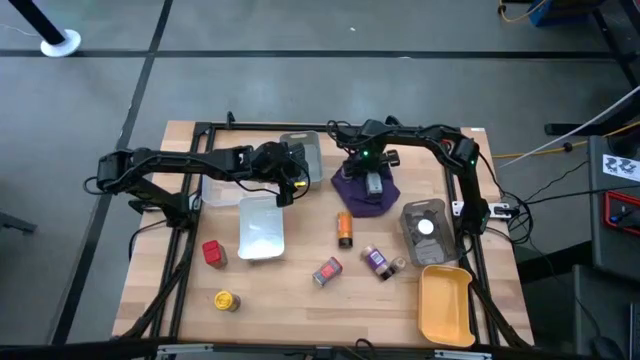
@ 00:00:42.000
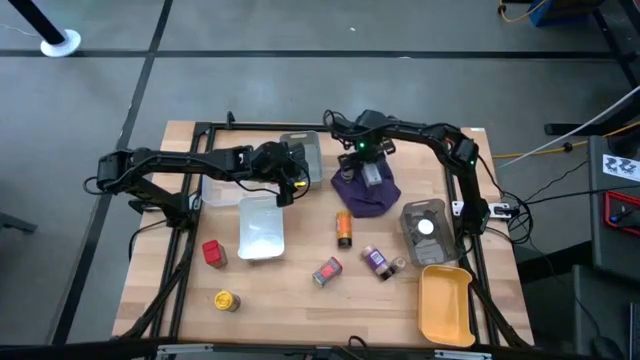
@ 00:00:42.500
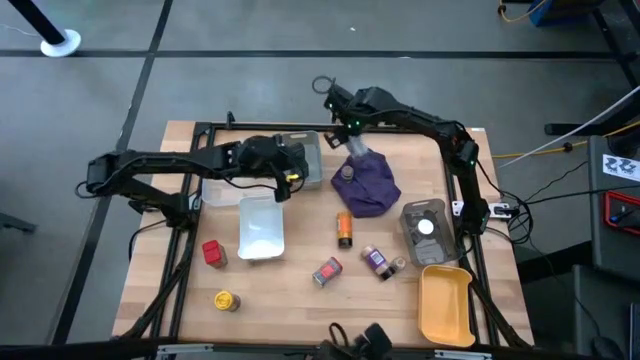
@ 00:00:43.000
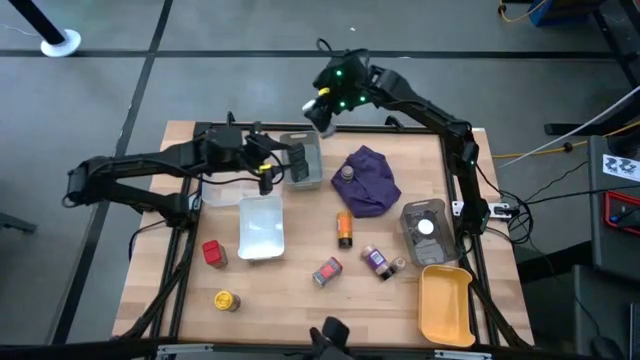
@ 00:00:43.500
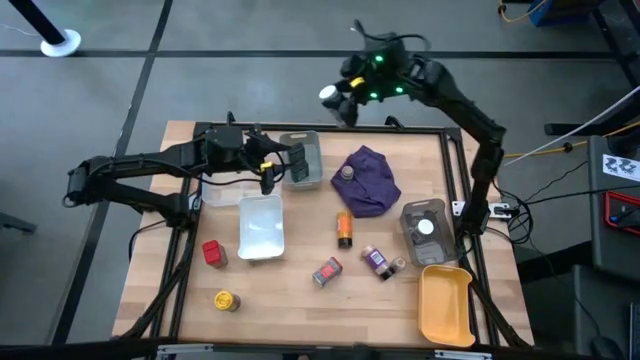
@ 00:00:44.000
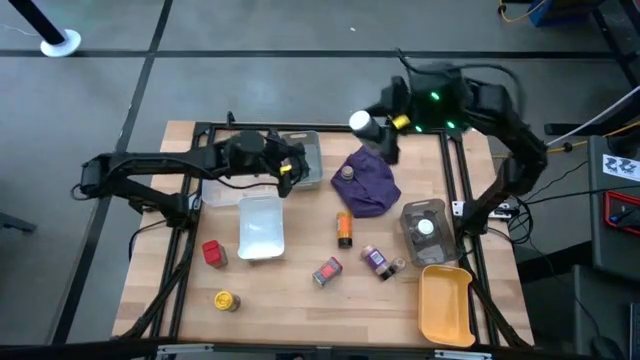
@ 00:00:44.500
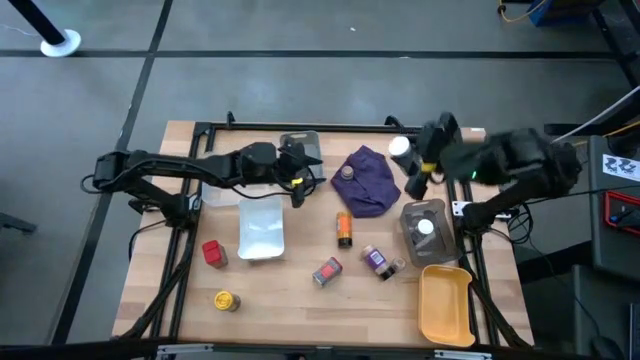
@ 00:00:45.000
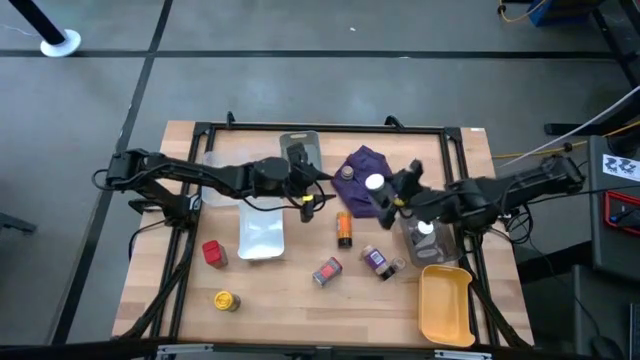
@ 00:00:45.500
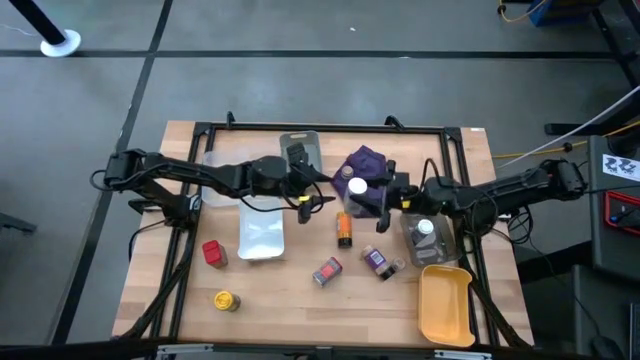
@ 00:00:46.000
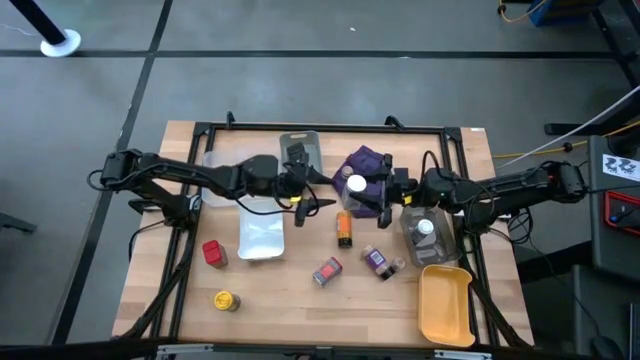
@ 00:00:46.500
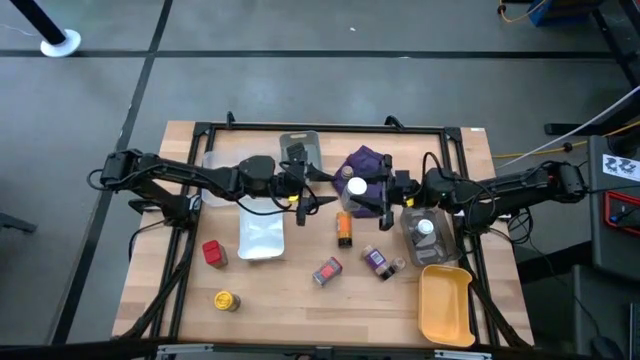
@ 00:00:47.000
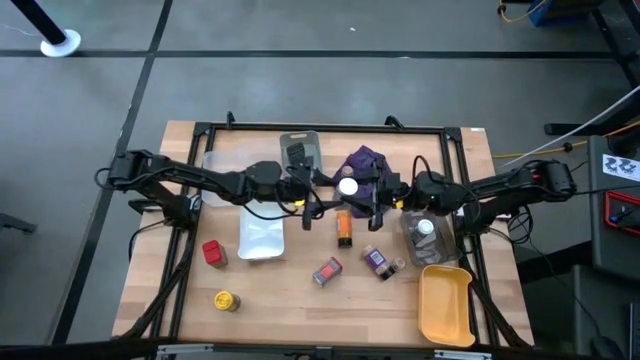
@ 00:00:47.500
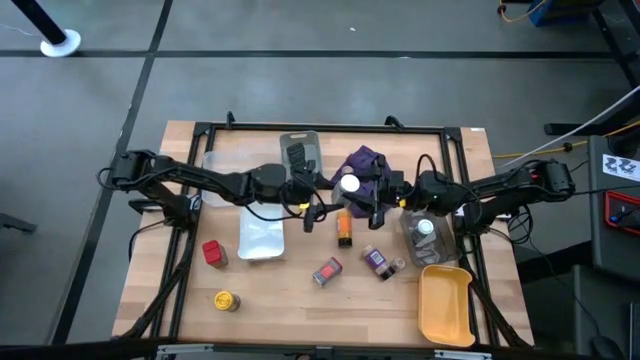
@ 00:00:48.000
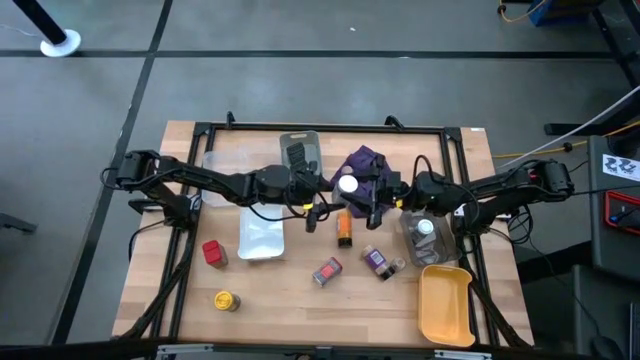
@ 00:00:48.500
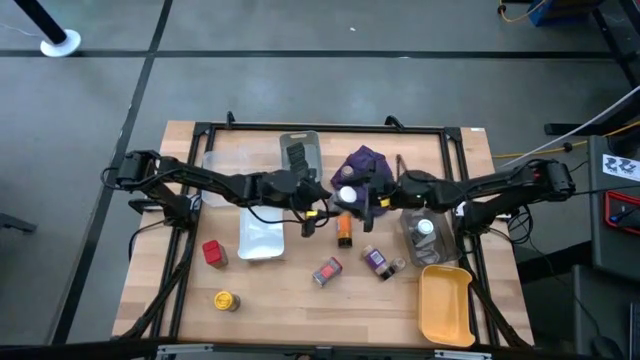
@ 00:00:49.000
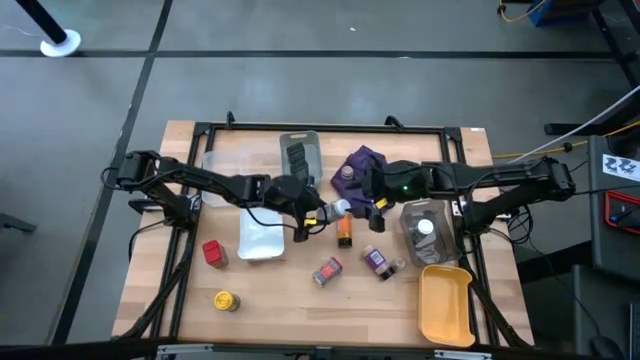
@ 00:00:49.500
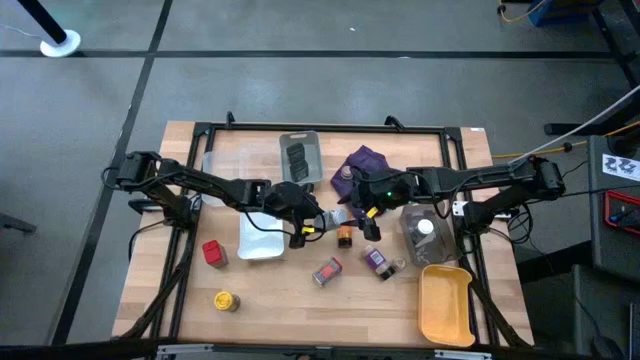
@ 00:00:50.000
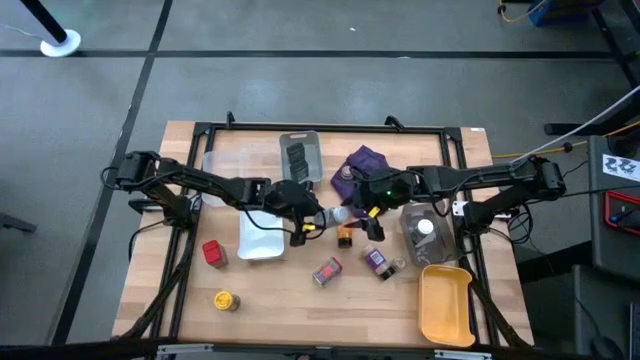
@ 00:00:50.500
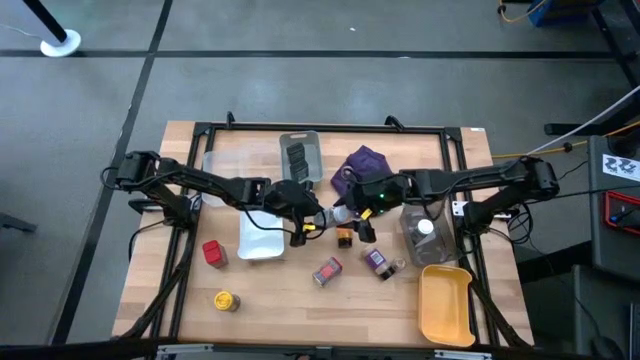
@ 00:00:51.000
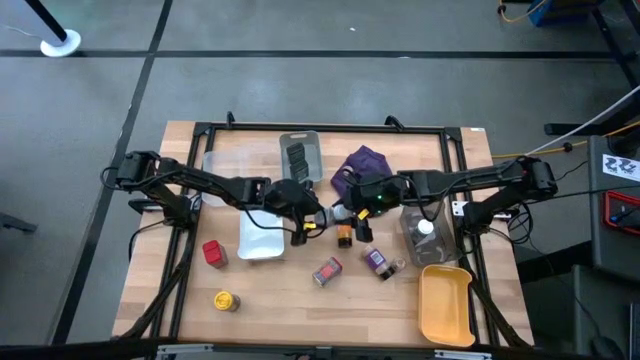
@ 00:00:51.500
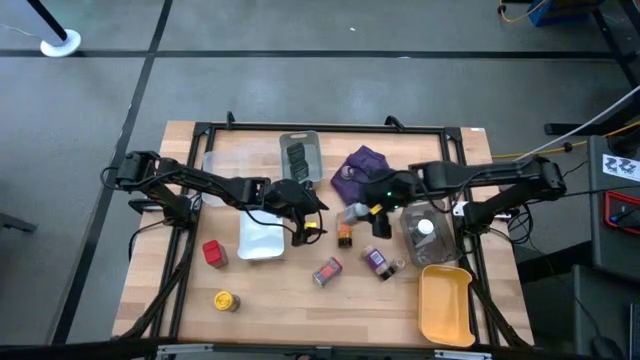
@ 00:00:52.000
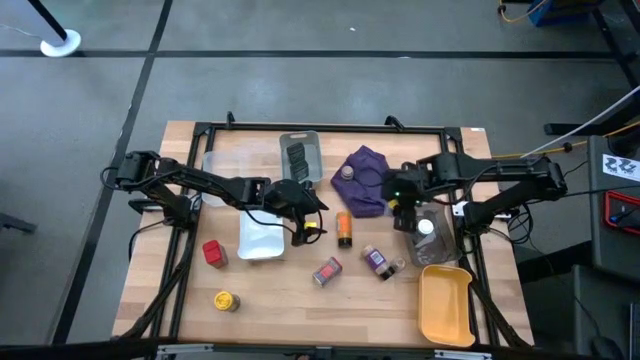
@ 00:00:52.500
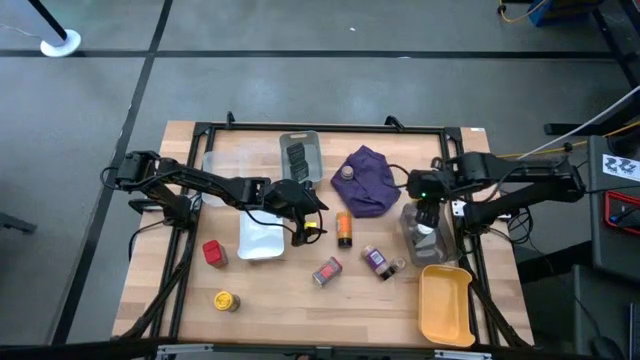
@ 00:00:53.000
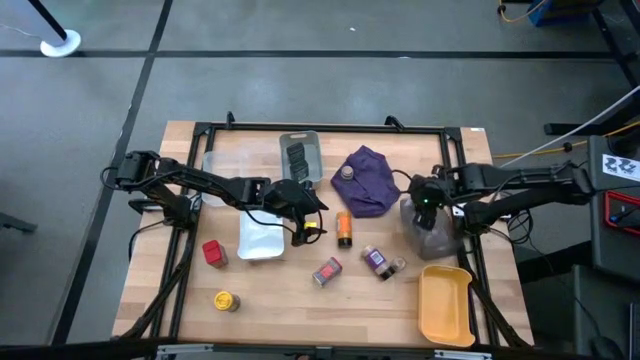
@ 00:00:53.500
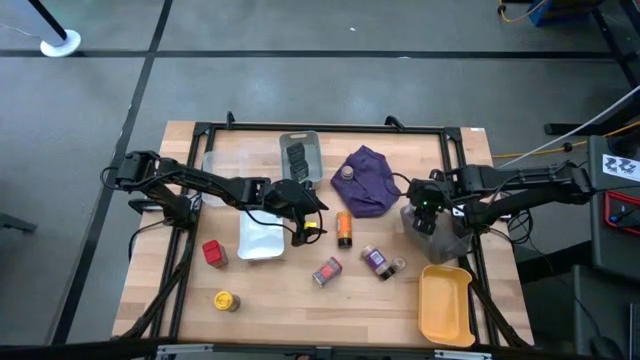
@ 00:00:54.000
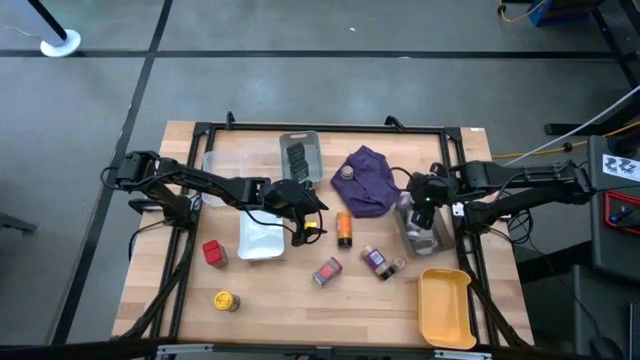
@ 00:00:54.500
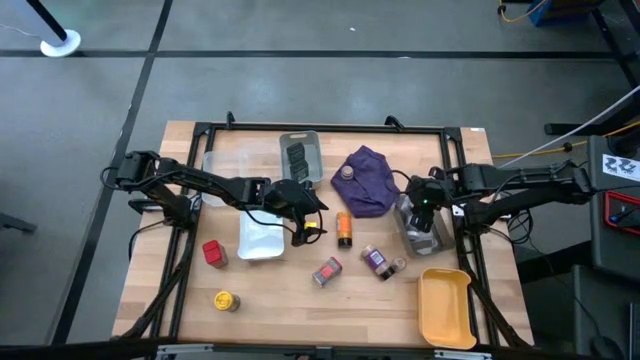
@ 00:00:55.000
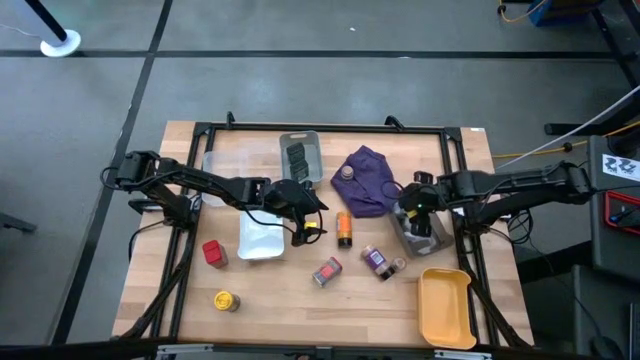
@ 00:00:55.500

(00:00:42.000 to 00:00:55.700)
Task: Sort spices by type
Put the white seasoning bottle into the black transparent bin

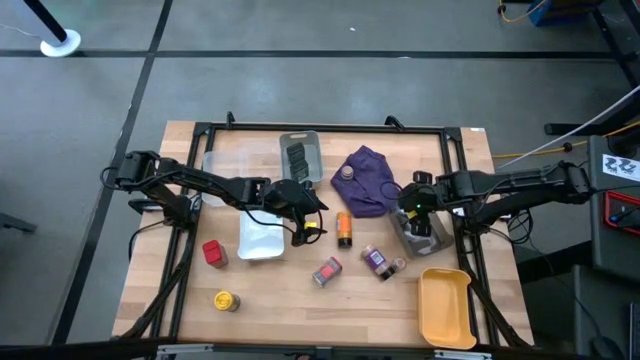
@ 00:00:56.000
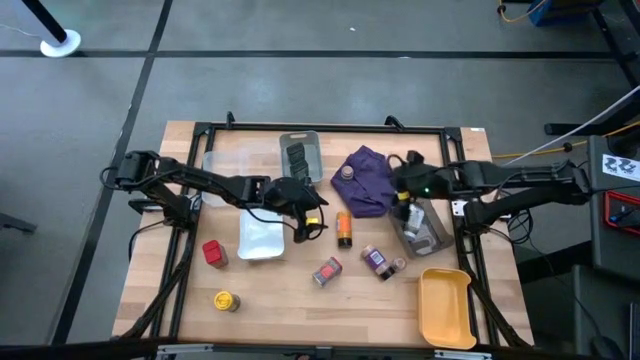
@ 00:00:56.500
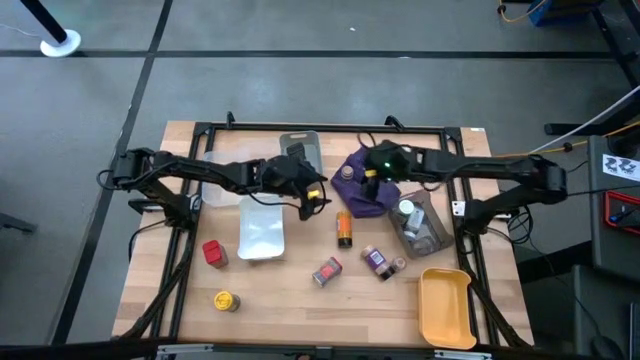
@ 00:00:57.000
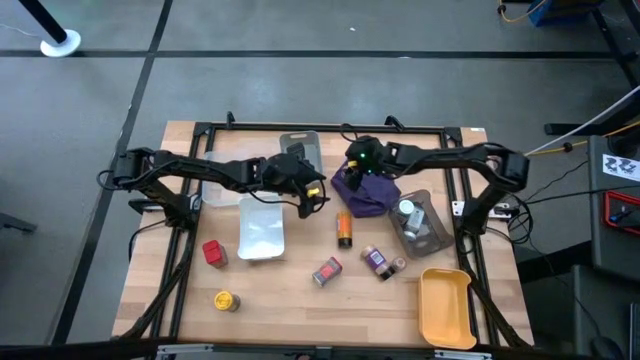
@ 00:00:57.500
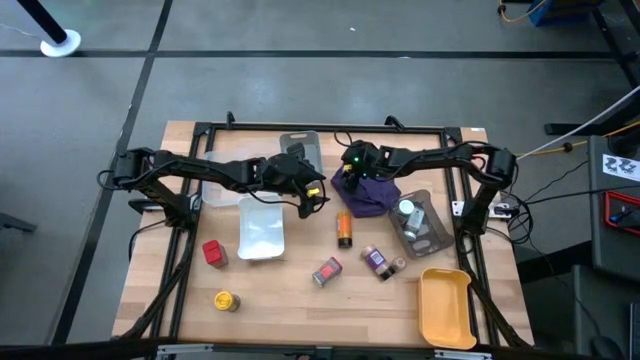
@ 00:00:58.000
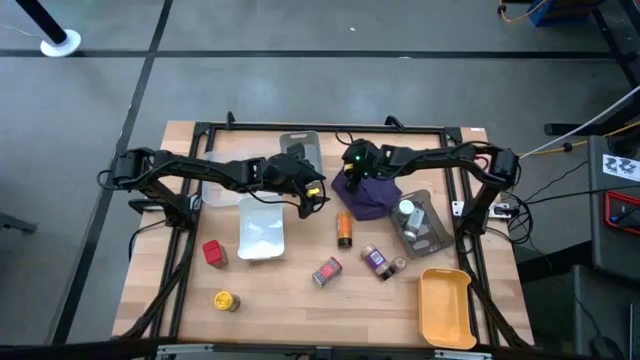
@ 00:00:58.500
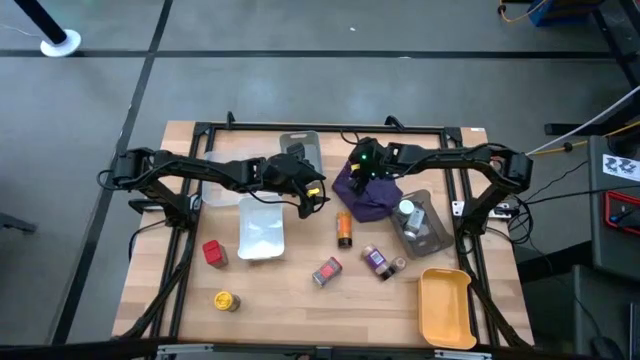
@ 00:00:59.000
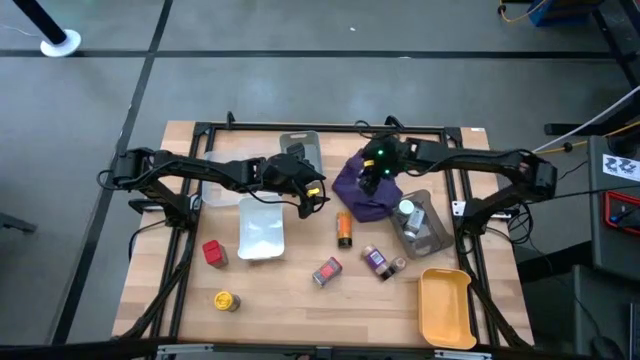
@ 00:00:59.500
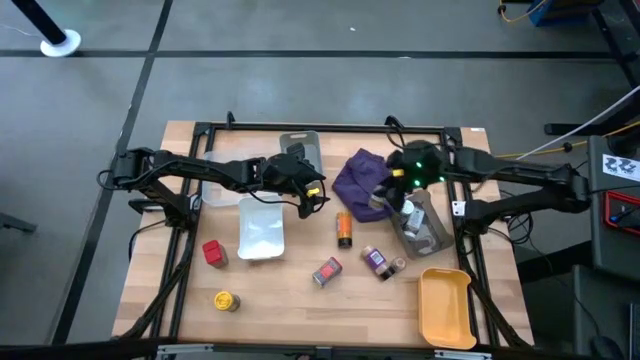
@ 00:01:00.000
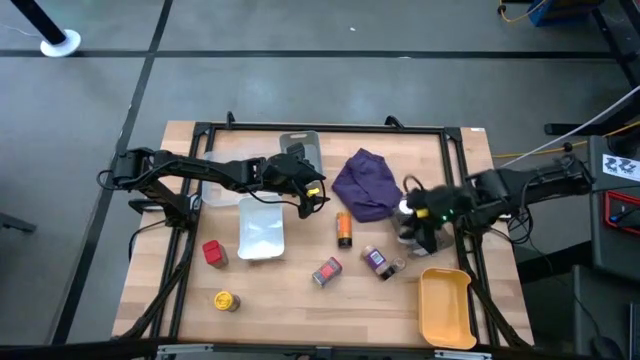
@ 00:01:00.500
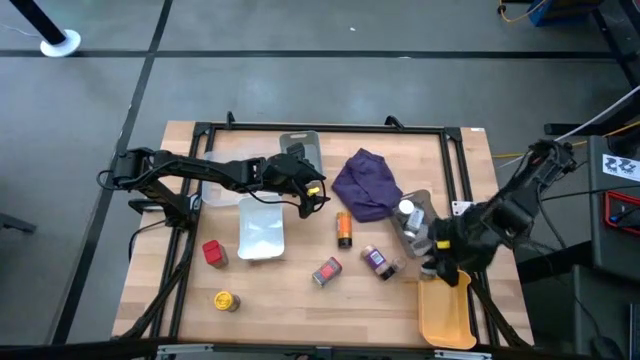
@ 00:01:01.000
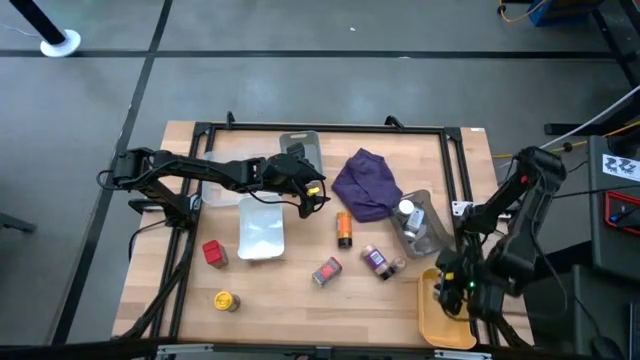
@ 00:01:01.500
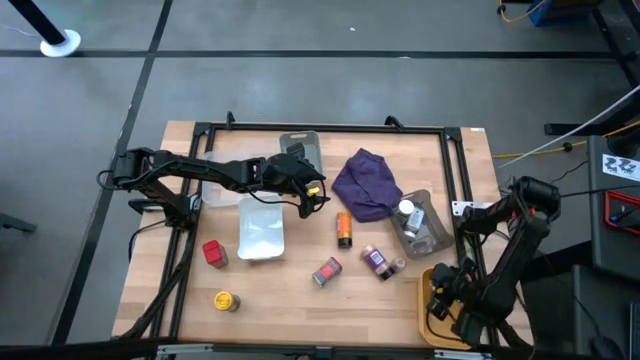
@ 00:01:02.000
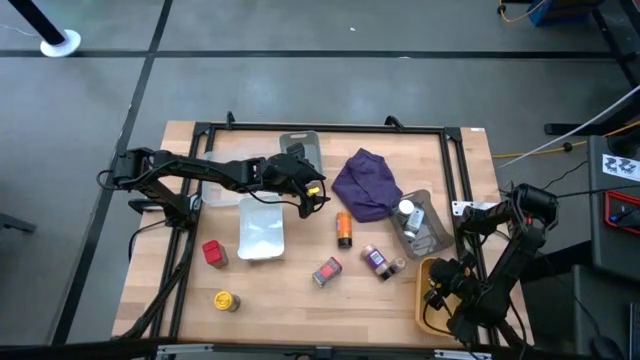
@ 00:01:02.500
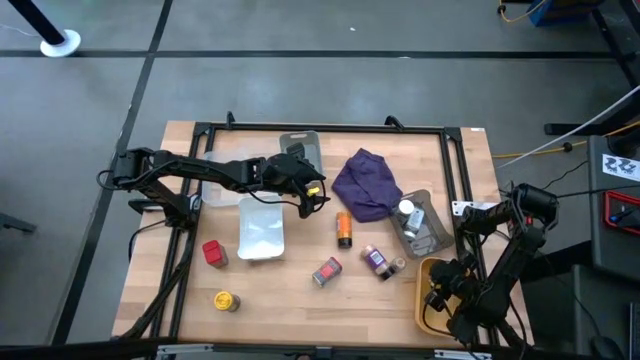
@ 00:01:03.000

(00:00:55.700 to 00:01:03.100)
Put the top right brown seasoning bottle into the yellow bin
